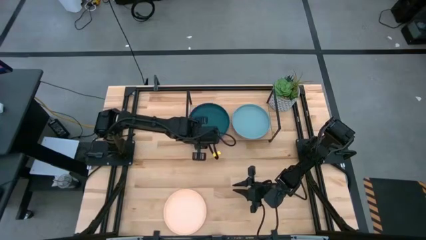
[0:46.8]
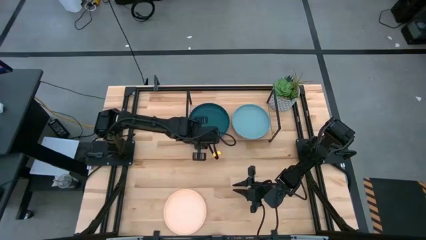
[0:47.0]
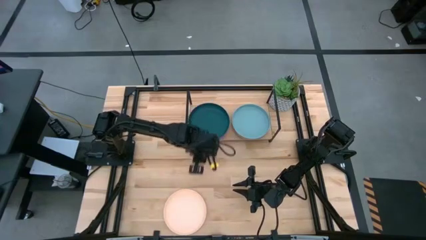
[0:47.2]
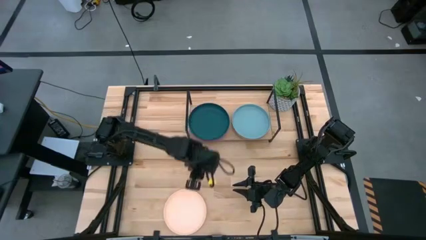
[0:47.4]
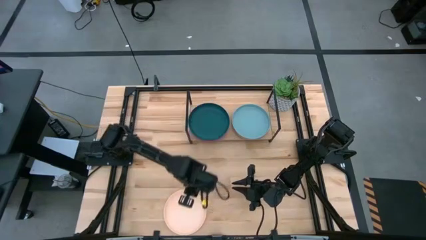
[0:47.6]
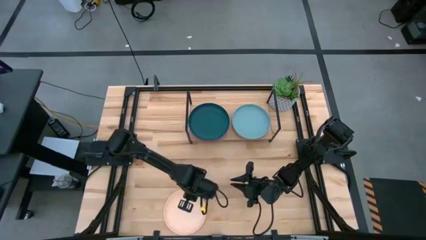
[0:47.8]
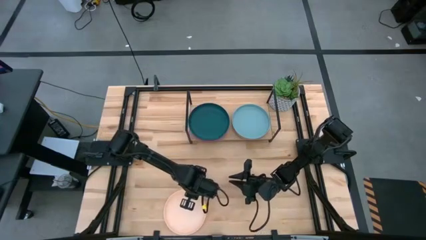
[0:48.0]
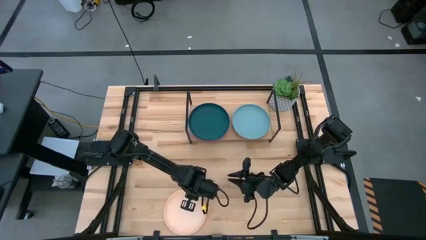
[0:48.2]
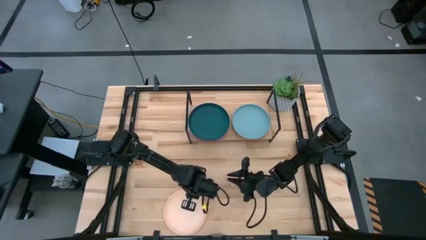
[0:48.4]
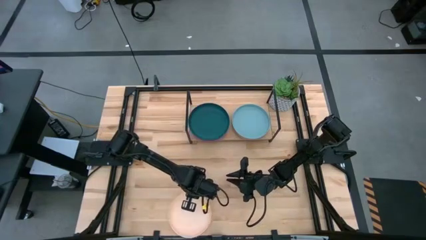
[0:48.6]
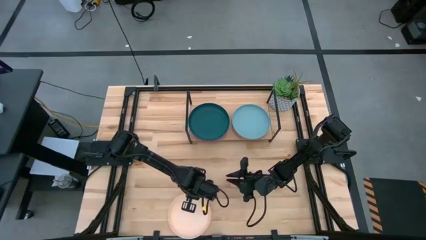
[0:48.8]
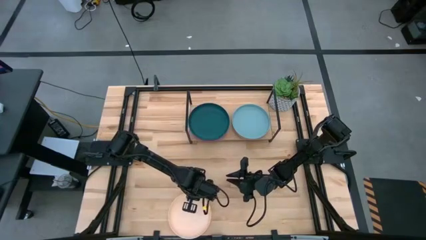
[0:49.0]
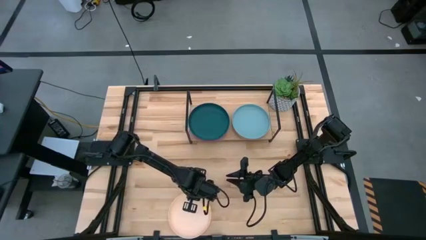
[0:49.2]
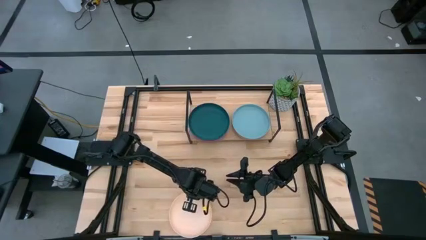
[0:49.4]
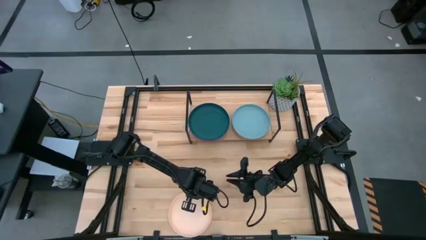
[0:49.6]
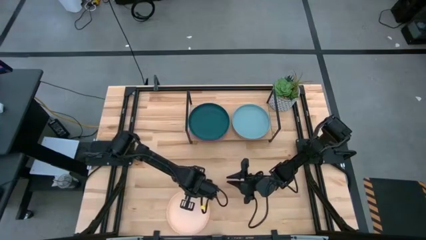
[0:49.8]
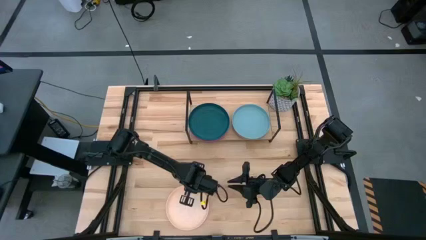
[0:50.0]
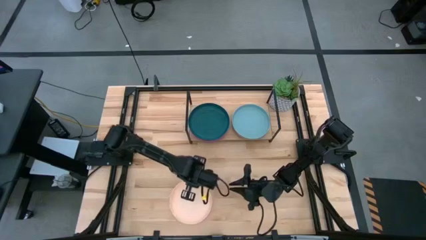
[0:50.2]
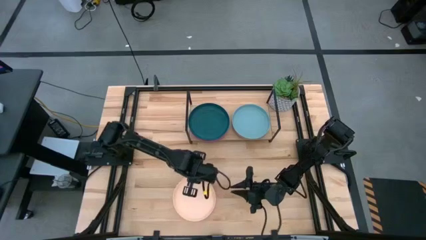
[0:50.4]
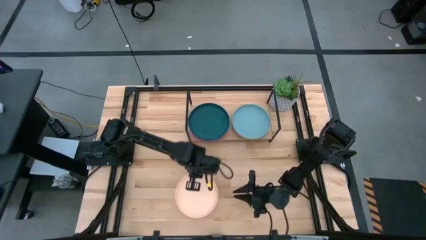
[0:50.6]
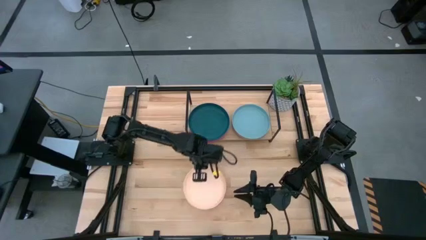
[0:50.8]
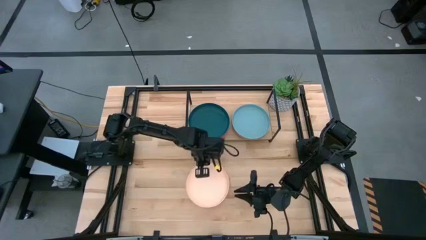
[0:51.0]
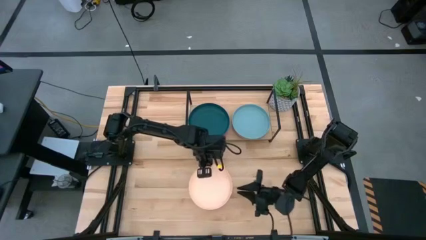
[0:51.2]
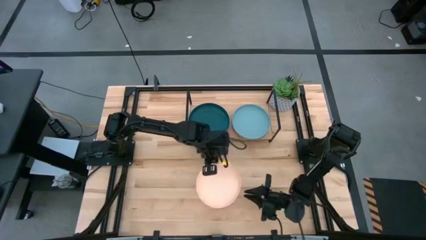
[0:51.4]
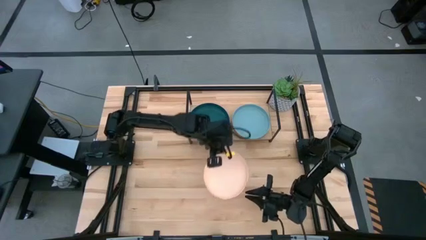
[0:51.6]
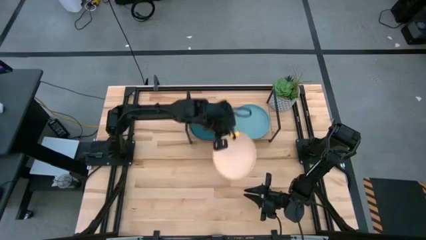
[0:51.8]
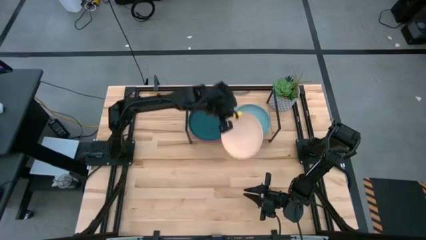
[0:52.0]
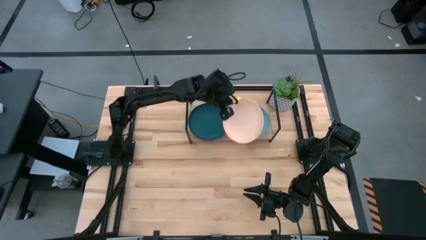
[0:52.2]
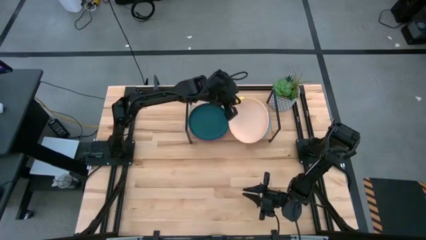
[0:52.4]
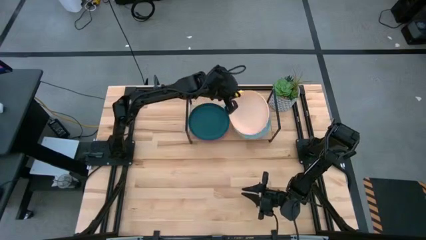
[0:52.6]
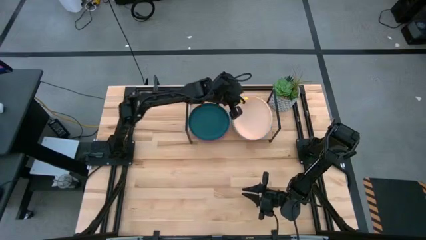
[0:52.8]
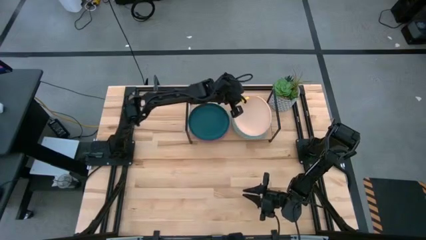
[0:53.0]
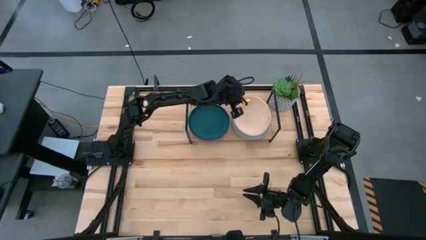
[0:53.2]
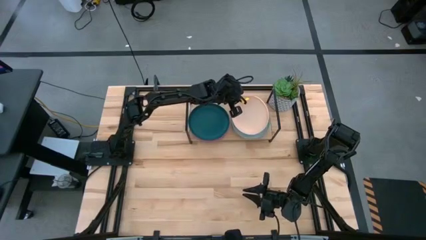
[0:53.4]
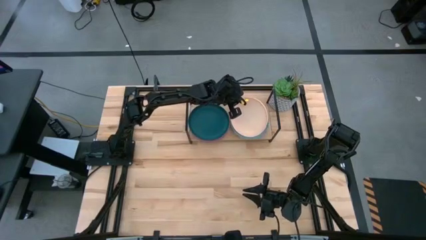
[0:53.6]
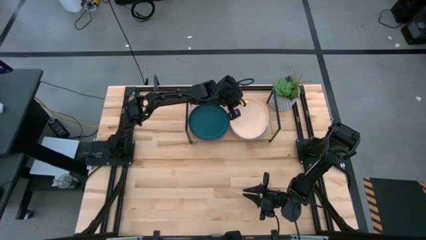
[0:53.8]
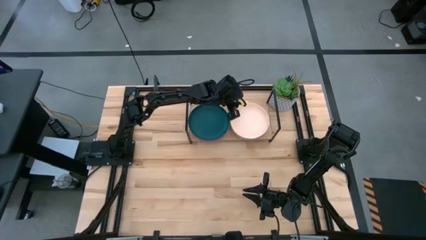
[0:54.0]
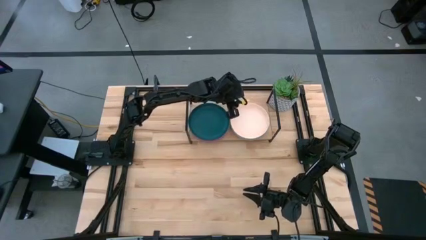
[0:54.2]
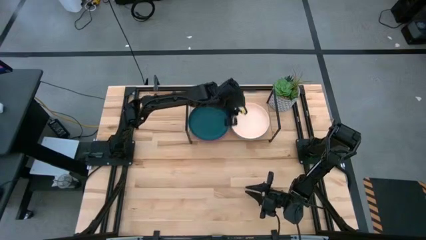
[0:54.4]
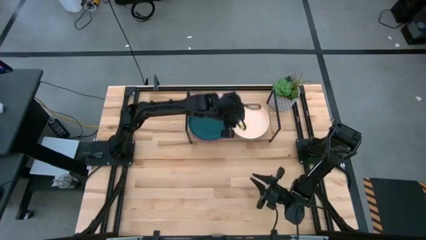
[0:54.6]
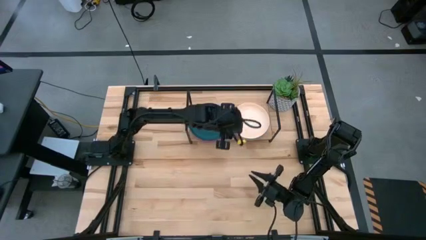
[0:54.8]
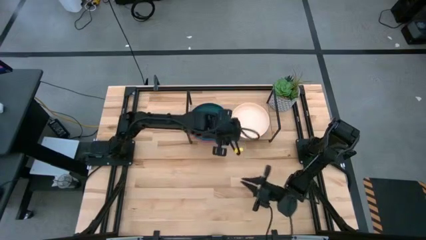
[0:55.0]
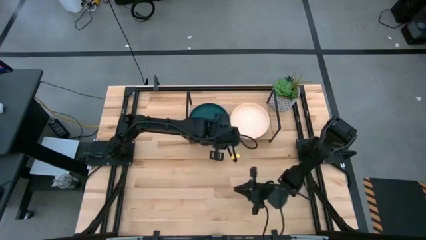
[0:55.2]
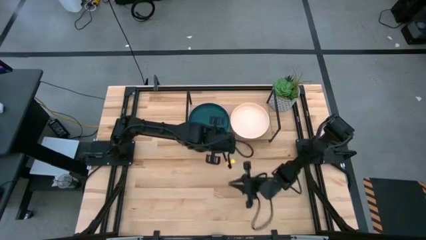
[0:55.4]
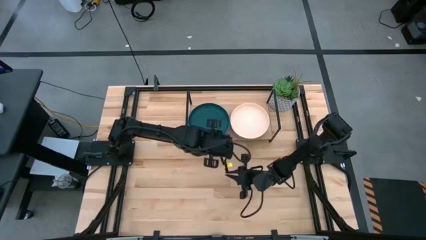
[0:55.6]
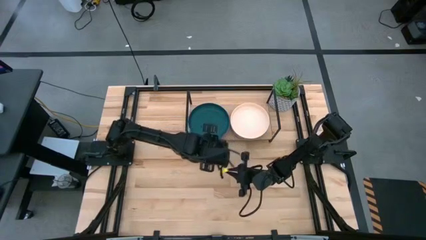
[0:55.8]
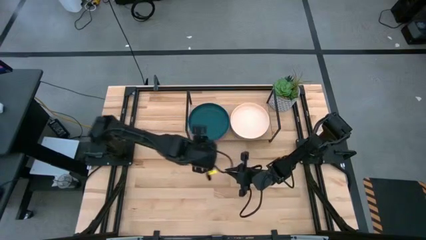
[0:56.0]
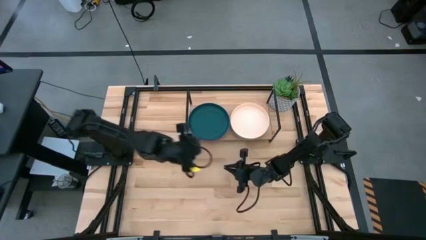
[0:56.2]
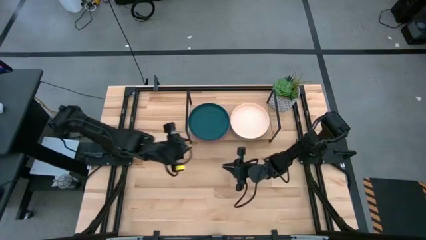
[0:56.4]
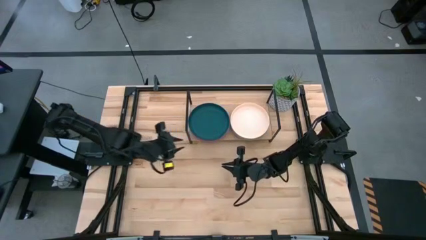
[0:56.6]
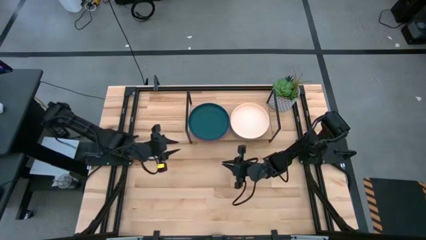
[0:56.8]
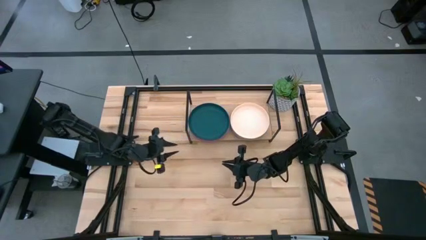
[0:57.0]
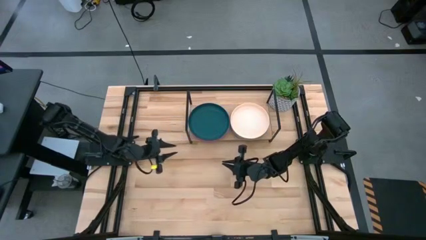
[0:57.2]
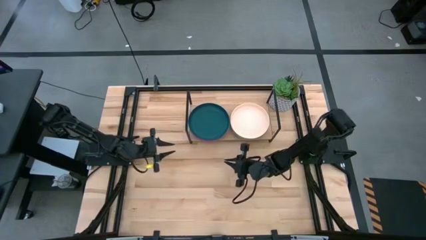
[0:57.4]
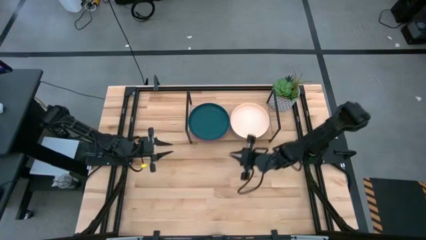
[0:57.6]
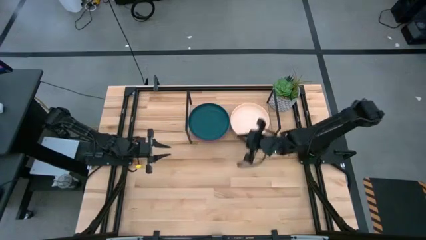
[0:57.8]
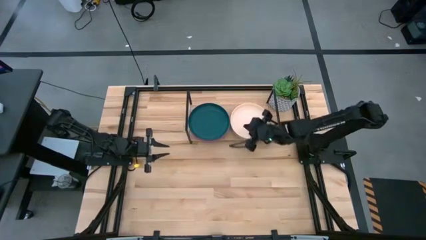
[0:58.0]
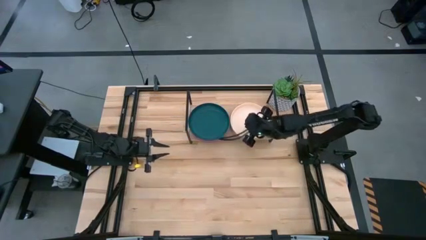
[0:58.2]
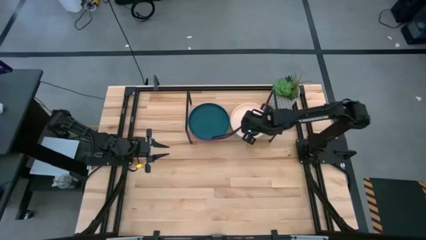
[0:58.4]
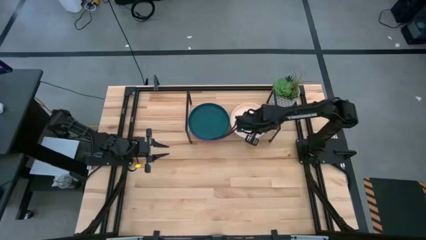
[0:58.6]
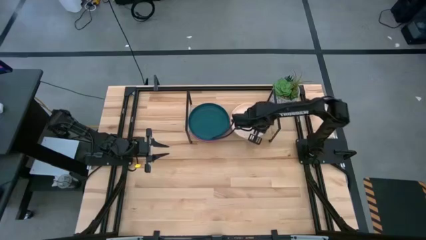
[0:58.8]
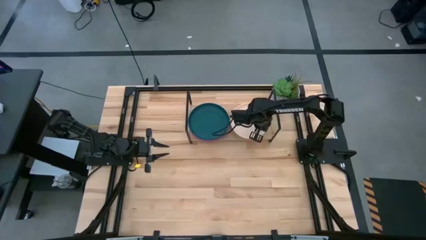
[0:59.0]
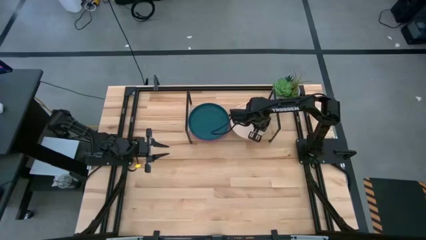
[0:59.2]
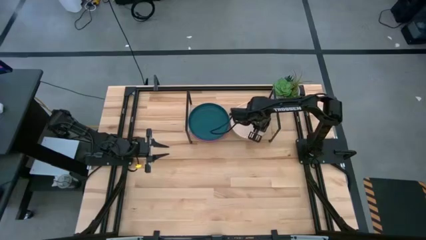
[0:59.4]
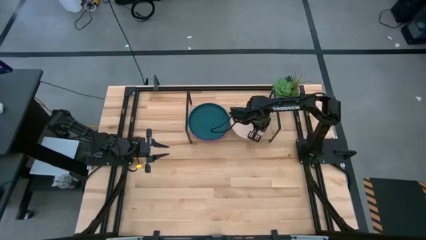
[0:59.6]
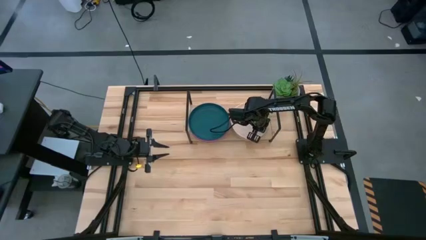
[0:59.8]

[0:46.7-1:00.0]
Task: Place and stack plates onto a shelf
Stack the light orange plate on top of the light blue plate on the shelf

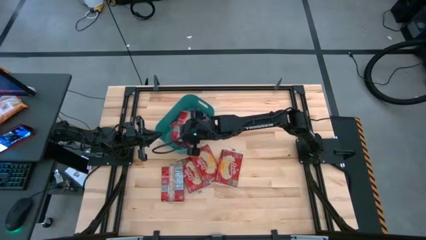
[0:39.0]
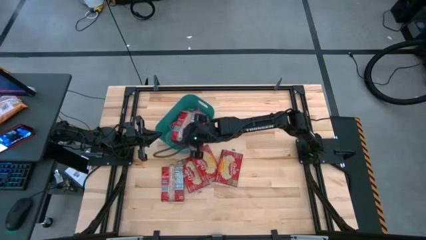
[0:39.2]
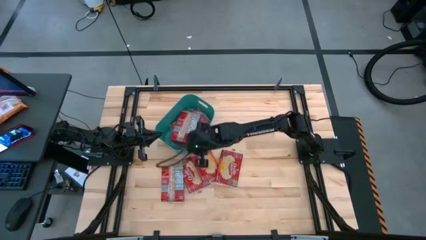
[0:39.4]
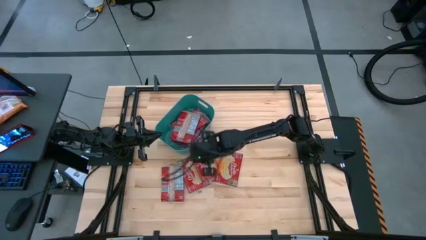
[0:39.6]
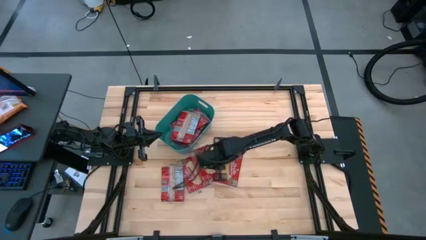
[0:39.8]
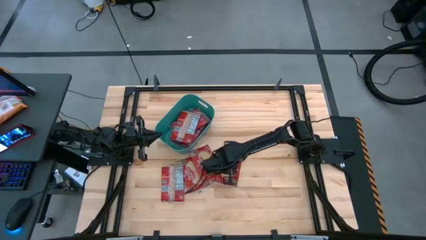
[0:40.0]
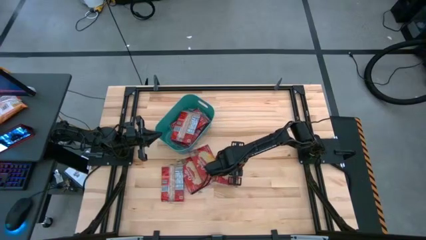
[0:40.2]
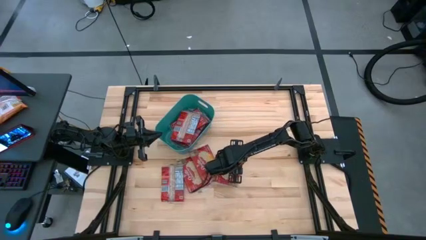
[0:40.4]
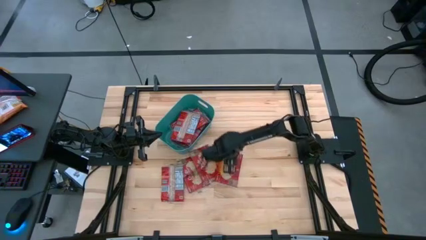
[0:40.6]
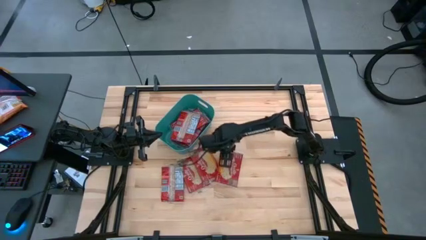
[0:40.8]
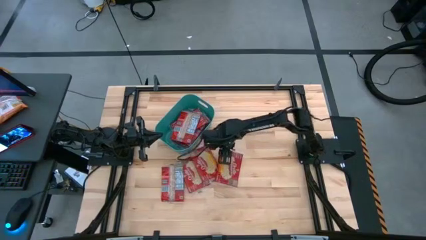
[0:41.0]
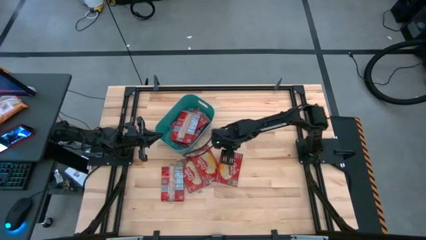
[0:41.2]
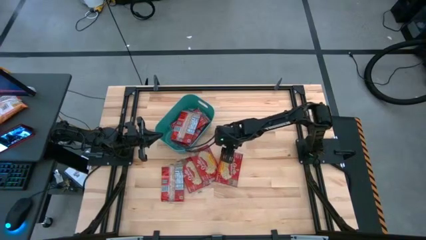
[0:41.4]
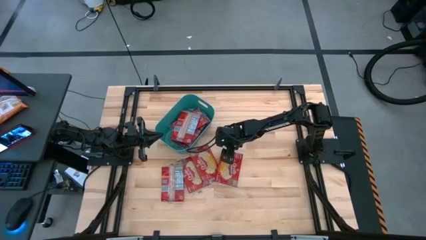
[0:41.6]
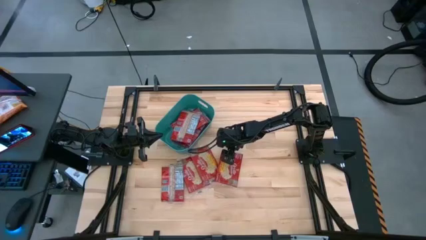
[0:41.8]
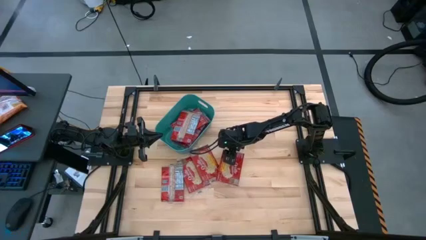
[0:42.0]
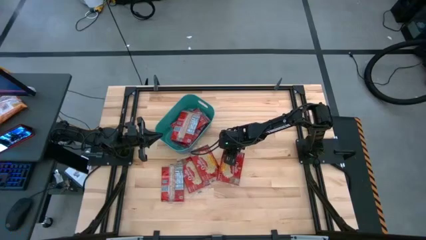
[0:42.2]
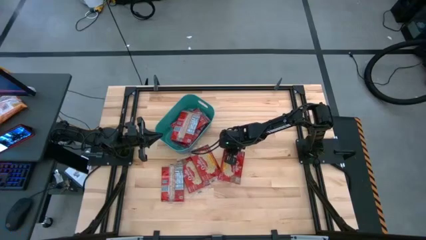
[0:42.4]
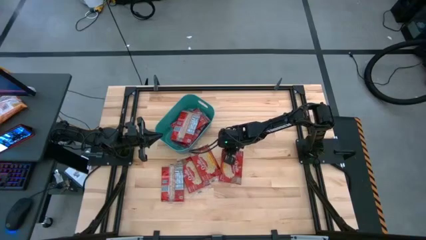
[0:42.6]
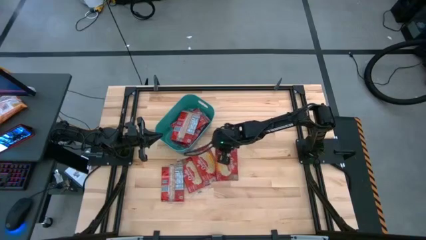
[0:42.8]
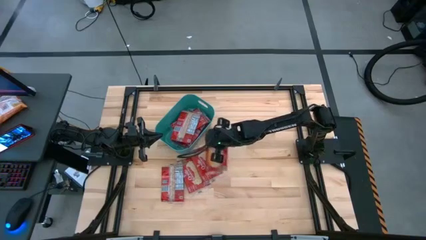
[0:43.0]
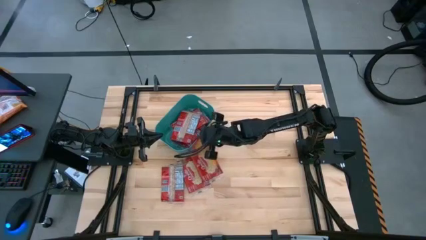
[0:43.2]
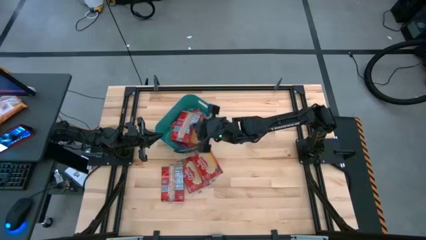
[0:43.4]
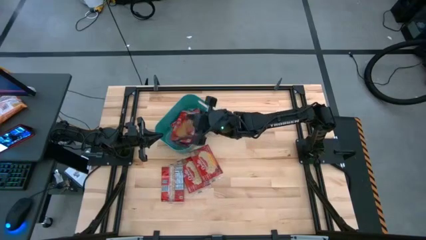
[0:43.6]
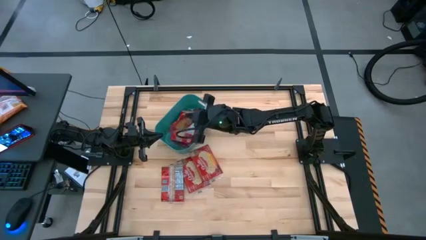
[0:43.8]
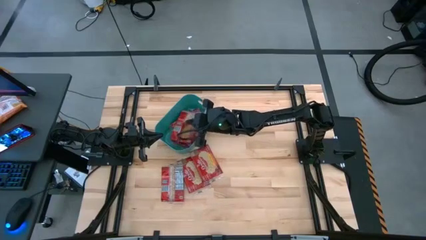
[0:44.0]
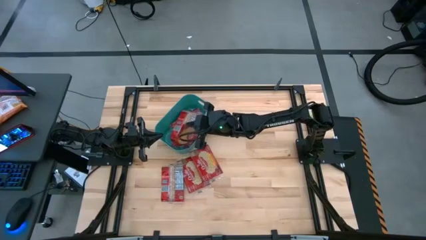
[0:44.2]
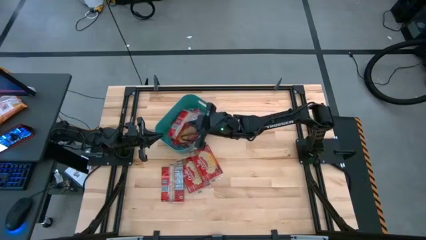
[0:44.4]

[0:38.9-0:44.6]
Task: Sort popcorn bags into baskets
Put the red popcorn bag into the blue bin
